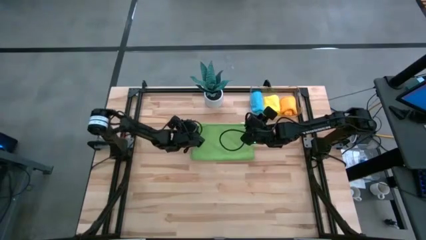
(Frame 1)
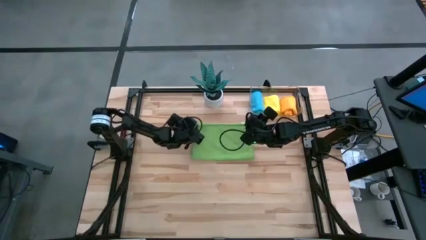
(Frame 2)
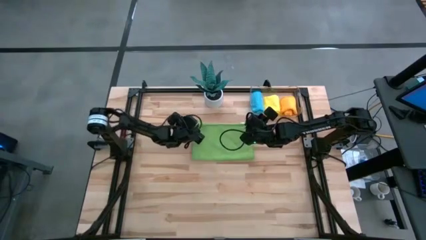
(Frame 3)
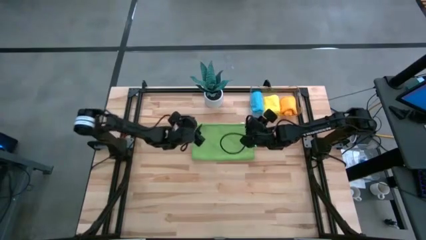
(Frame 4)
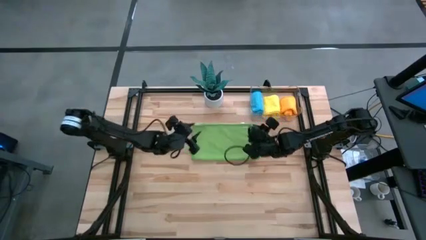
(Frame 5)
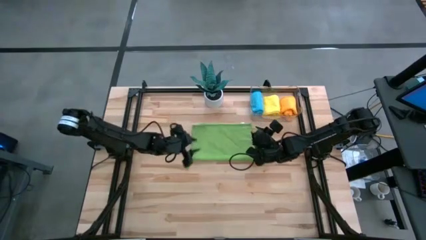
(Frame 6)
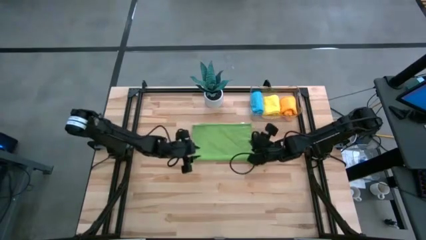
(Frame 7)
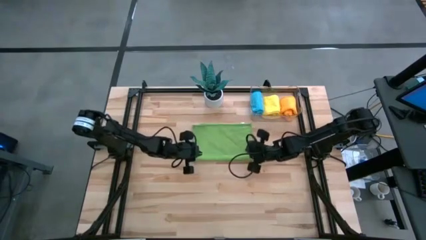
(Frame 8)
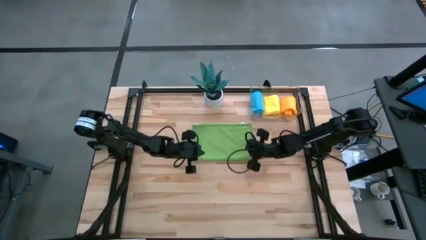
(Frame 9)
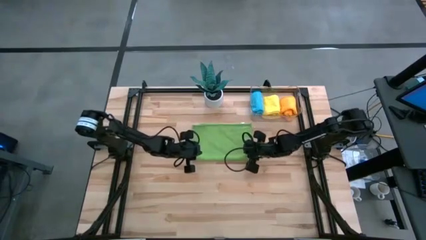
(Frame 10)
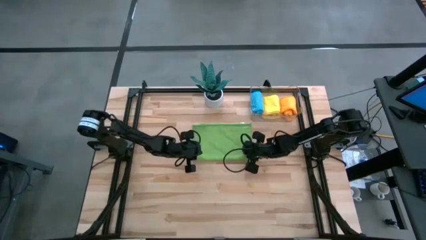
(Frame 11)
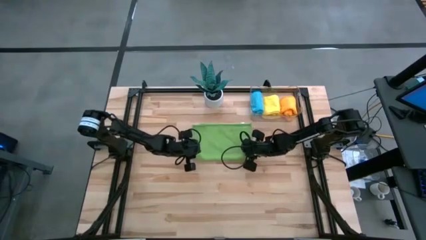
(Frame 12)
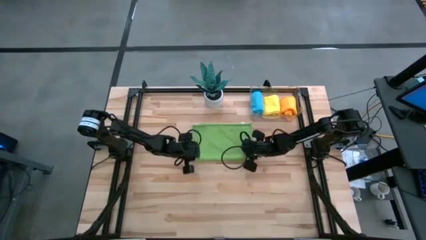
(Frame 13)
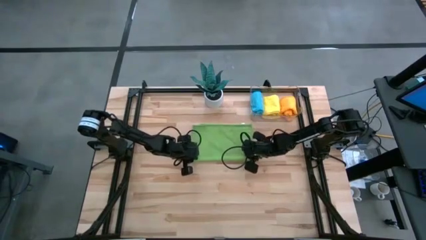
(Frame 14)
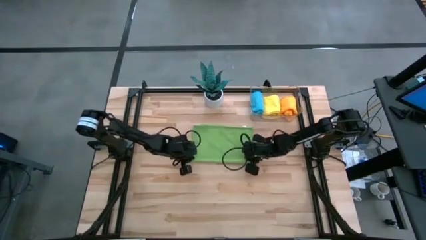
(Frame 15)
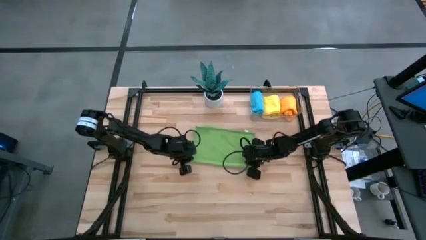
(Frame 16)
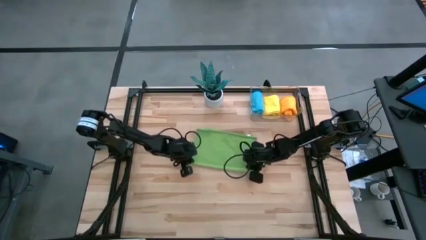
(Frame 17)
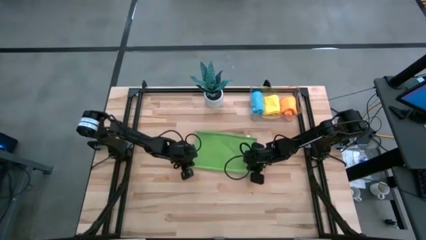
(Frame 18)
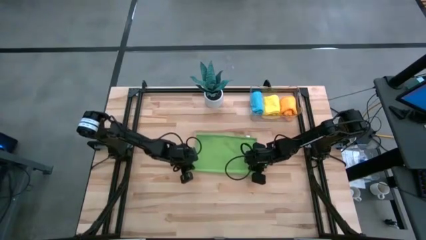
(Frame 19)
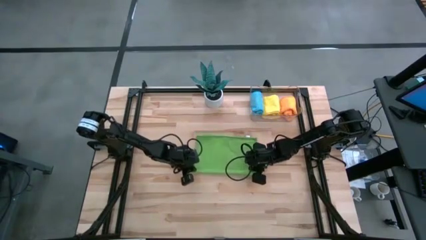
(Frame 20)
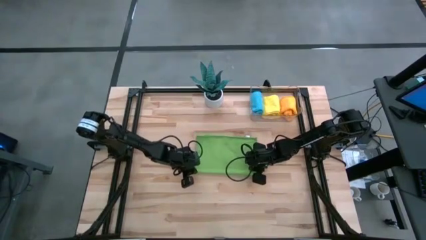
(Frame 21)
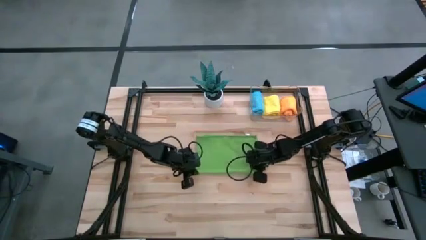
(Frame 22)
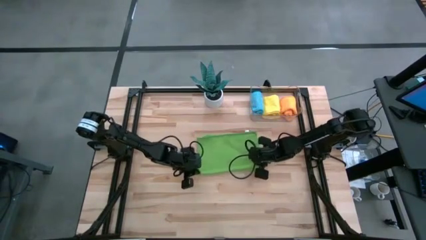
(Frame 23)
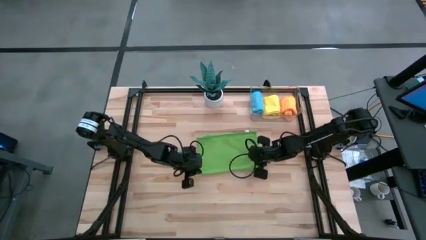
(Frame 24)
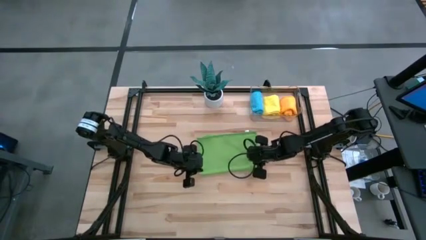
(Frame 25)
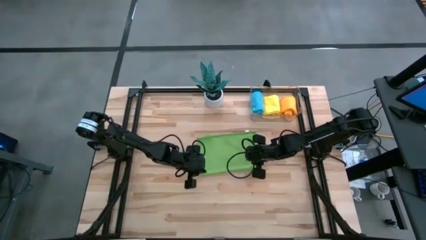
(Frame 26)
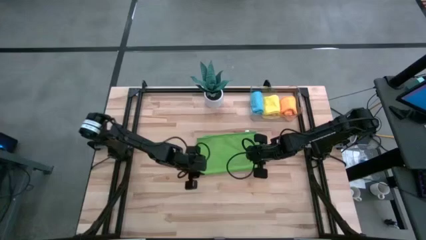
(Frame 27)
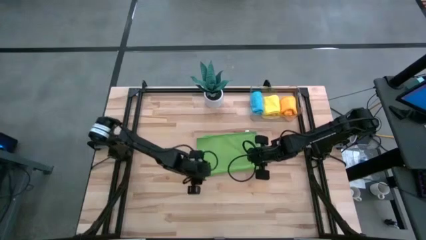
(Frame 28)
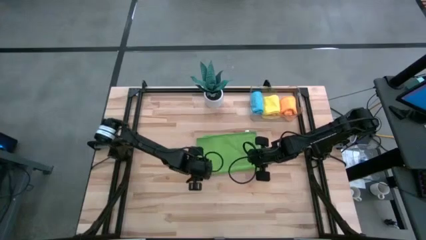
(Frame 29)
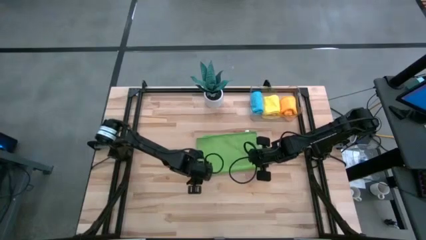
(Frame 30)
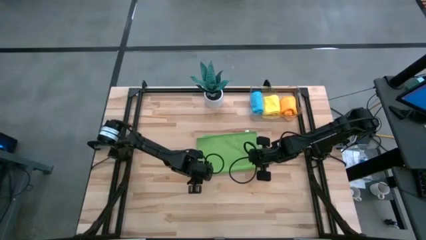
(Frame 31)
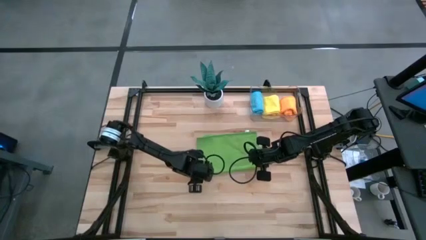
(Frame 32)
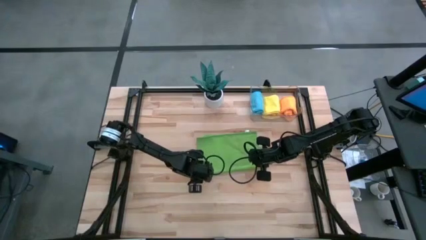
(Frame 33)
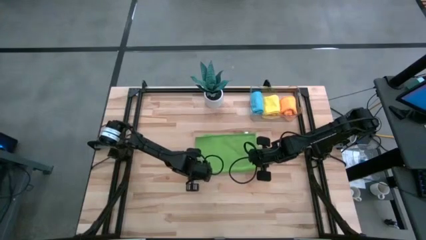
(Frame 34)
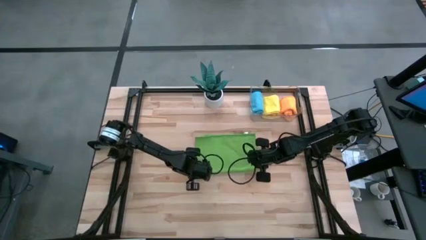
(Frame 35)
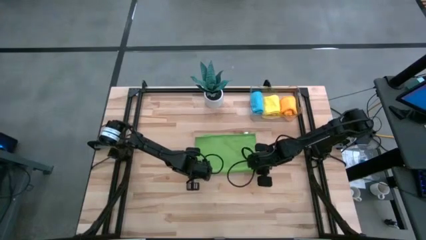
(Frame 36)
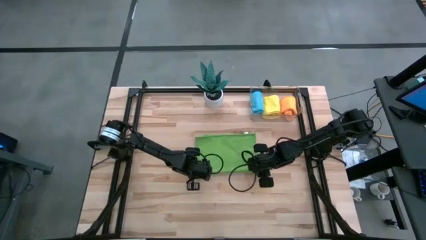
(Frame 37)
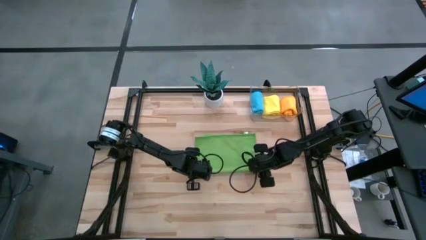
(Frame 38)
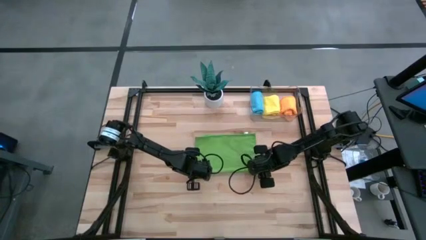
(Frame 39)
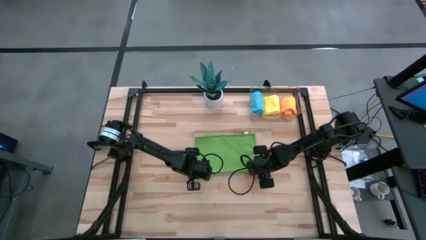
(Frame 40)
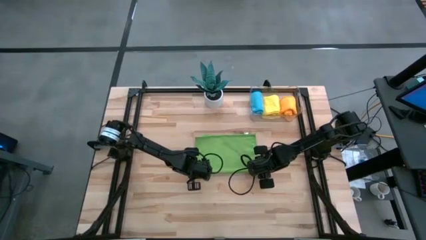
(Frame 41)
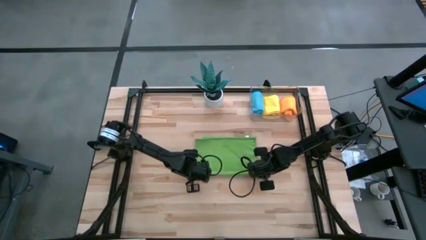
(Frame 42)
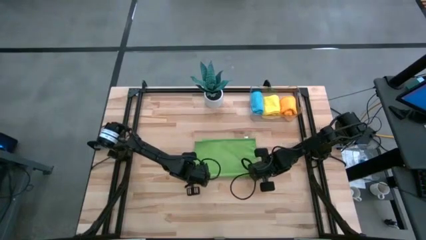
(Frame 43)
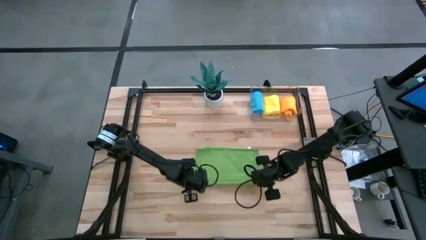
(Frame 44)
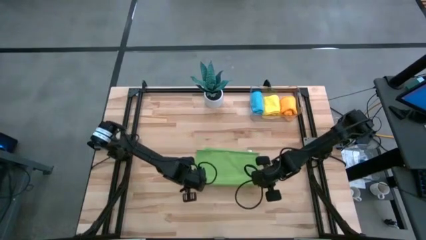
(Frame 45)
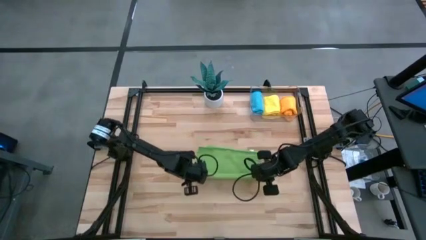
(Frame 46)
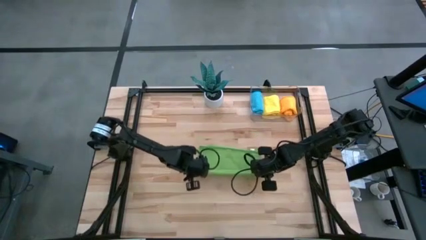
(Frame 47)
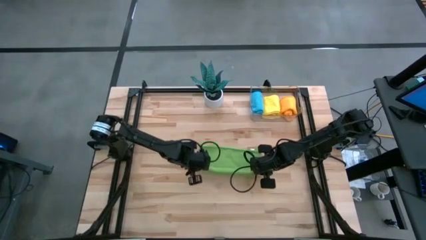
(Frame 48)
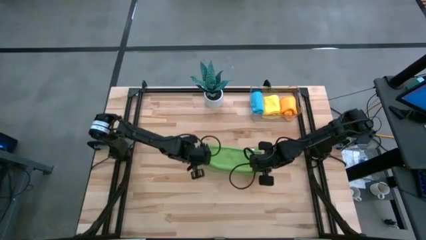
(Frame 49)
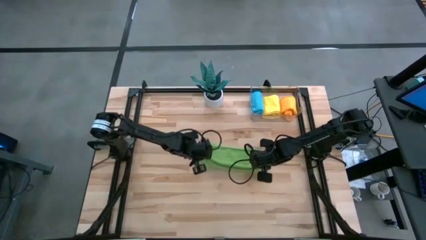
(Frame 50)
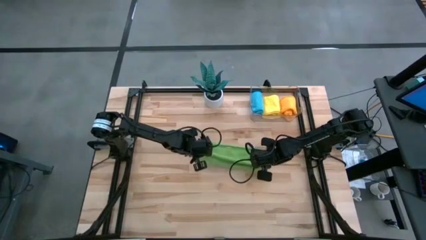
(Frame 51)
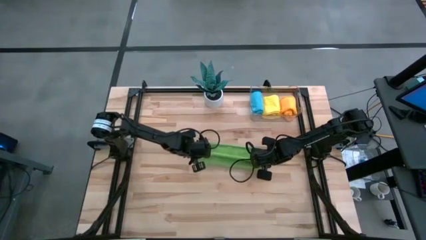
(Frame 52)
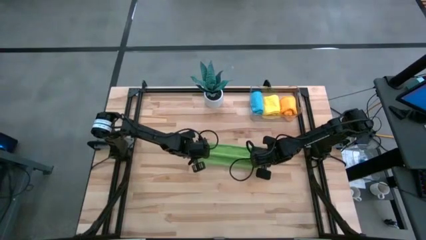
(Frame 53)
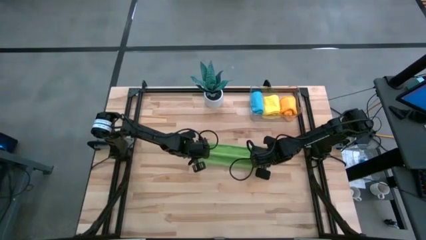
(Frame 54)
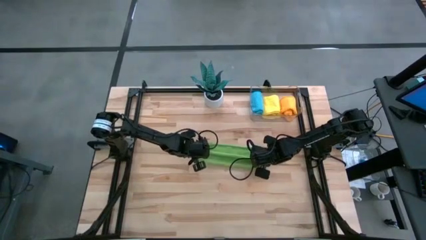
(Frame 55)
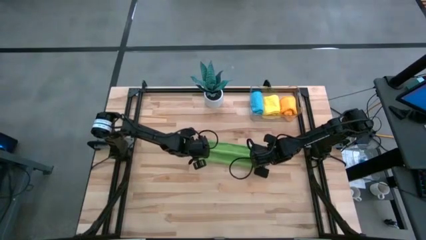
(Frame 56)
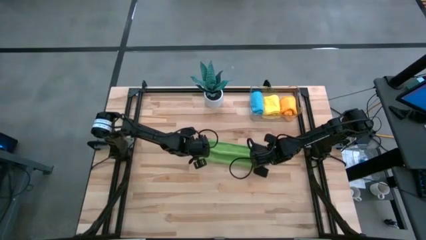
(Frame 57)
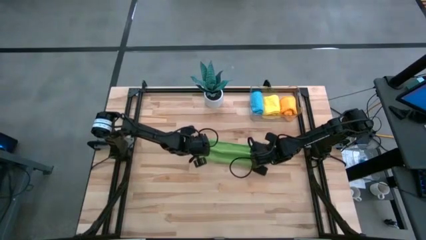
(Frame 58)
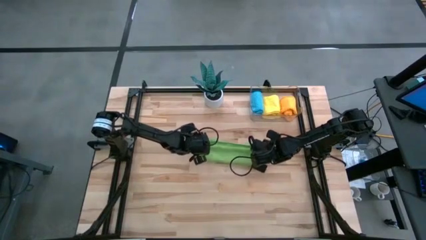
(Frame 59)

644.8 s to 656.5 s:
Task: Roll microfiber towels into tight, uniform cylinder then place into a basket
Fold the green microfiber cloth

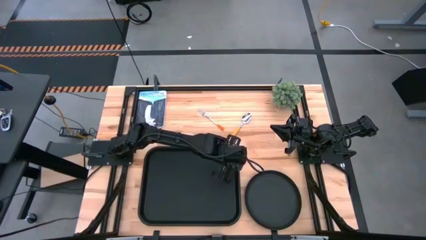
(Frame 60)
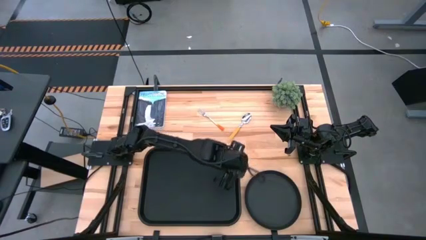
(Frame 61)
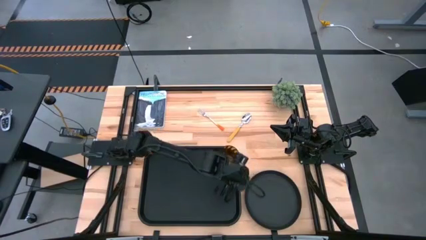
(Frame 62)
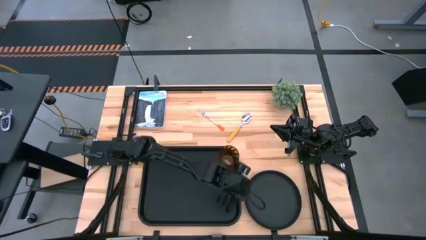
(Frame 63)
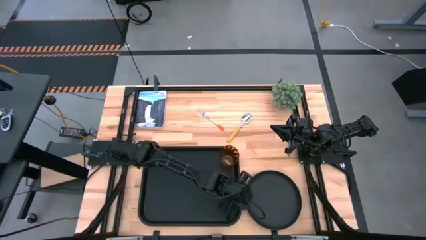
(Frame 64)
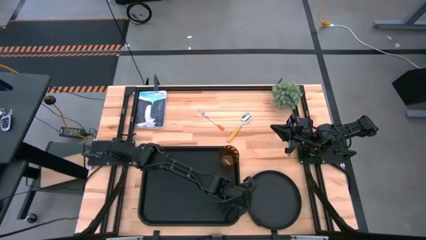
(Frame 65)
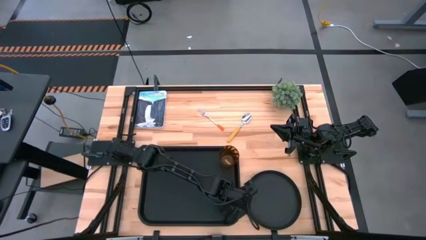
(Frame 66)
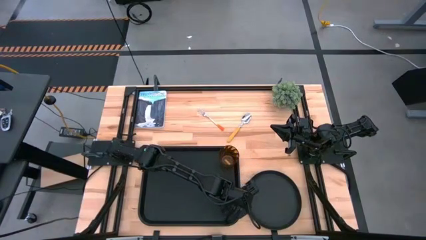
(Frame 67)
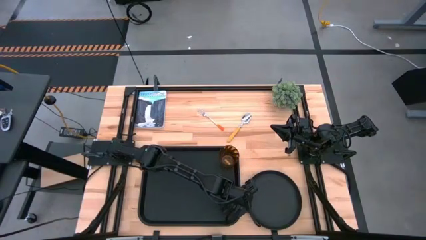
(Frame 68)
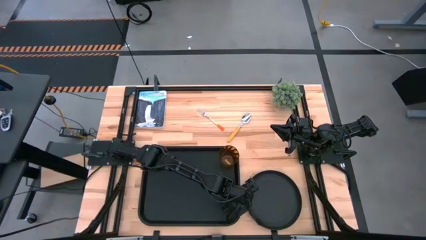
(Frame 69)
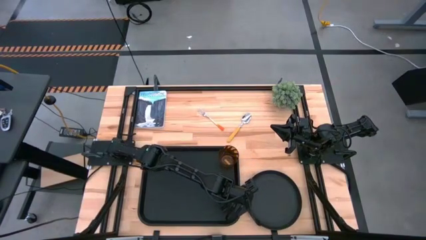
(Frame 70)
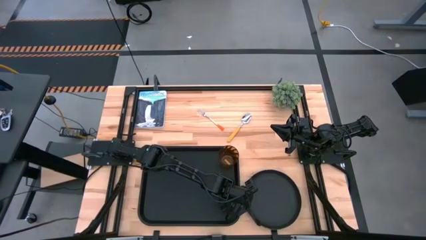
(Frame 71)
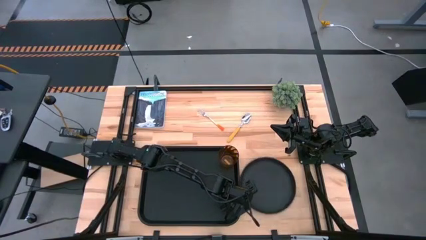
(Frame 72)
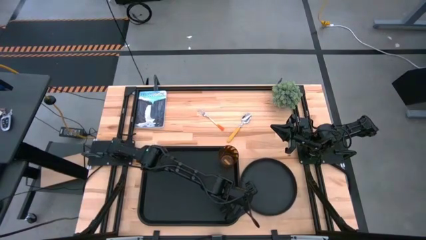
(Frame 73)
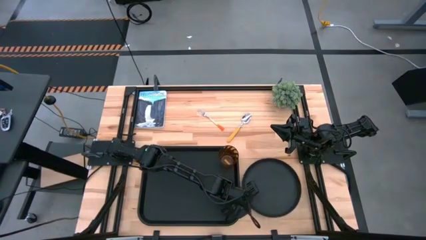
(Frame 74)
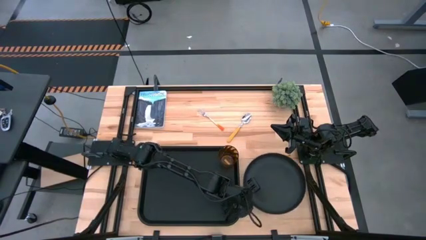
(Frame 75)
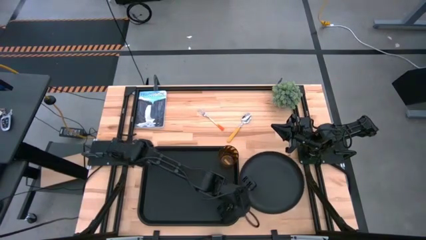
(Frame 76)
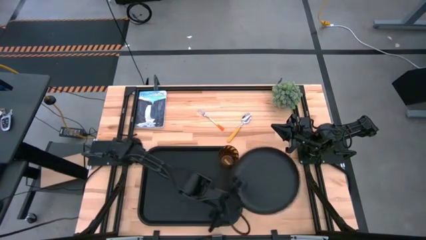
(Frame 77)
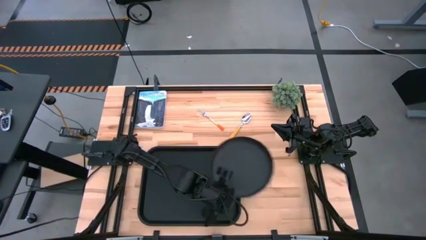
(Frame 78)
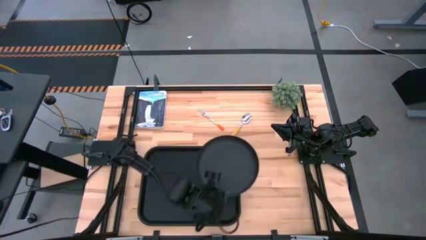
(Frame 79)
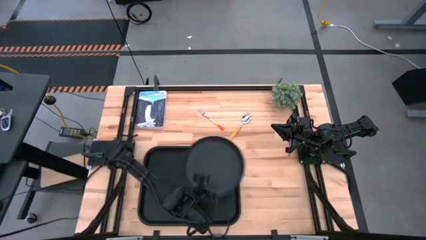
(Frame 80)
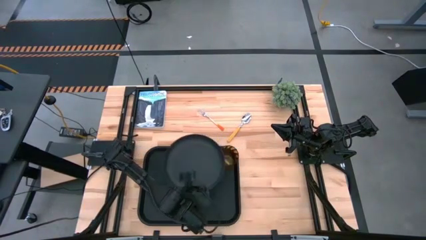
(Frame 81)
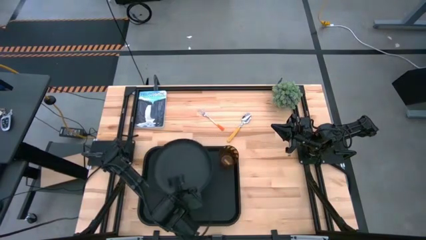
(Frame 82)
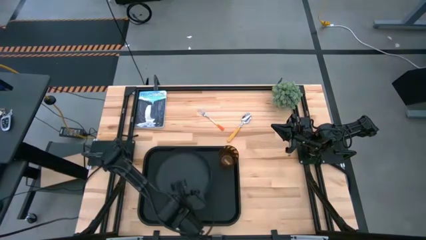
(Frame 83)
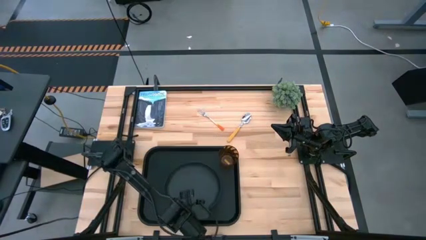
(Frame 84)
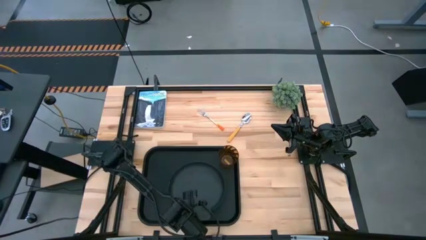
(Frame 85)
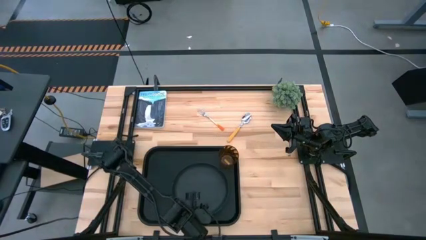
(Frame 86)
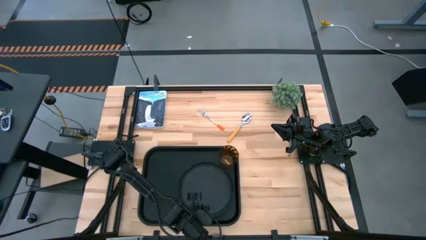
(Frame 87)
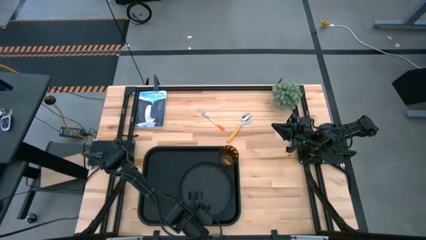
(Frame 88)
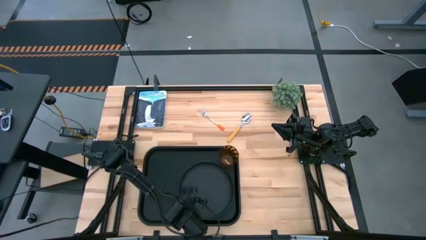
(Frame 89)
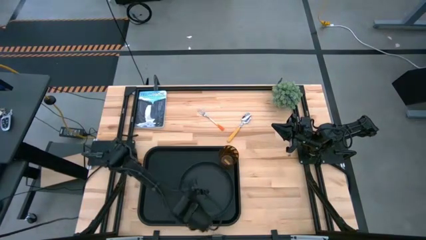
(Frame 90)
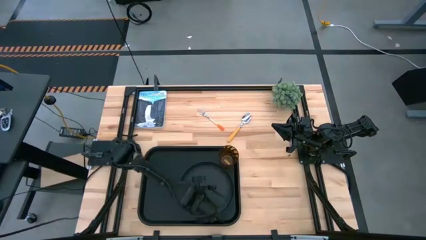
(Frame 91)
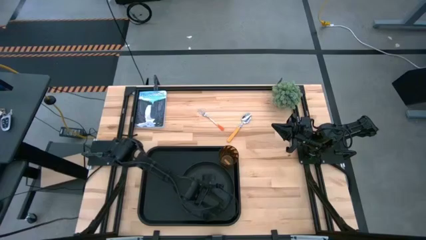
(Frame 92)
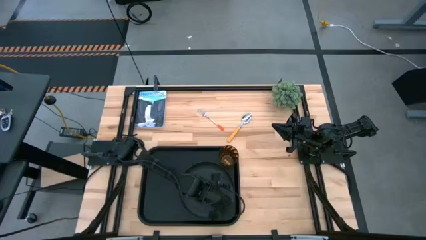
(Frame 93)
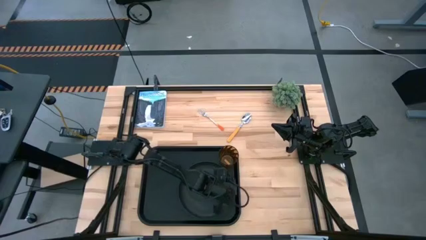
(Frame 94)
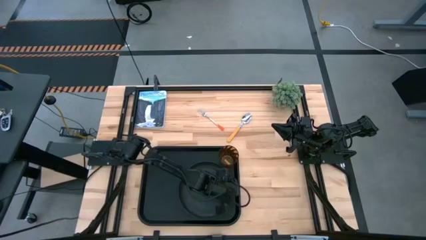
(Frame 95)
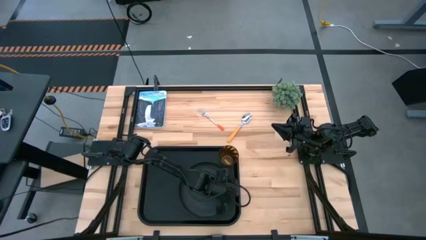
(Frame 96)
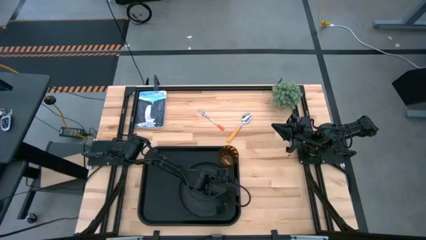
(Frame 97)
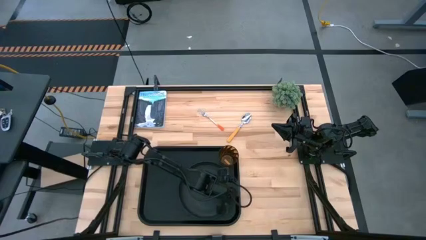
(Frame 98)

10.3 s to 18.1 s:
Task: Pick and place plate/cup/fork/spoon on tray
Put the black plate on the black tray to the bottom right of the orange cup
